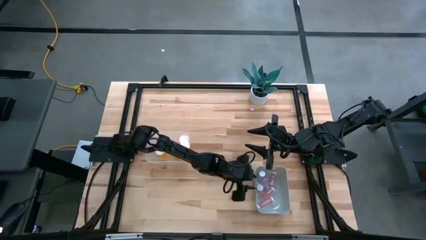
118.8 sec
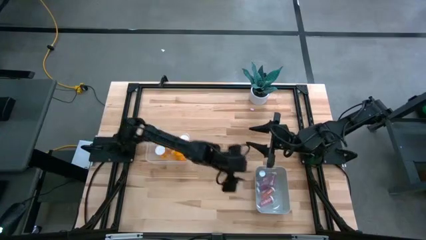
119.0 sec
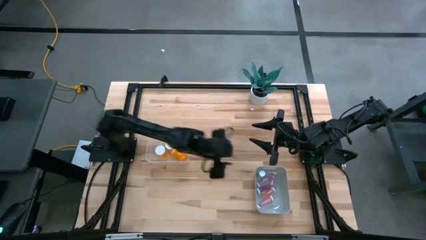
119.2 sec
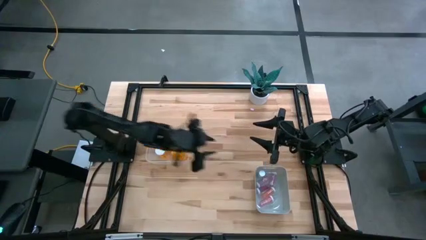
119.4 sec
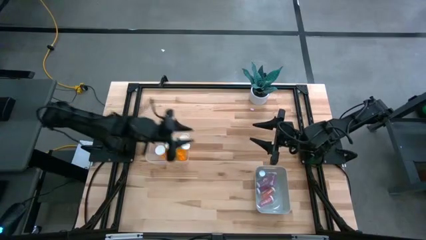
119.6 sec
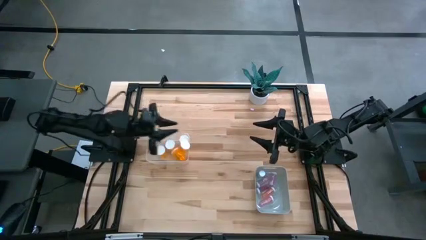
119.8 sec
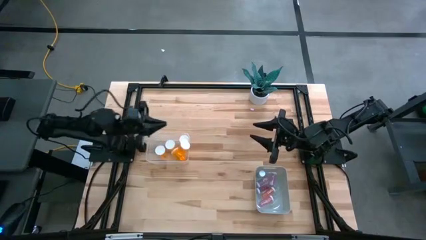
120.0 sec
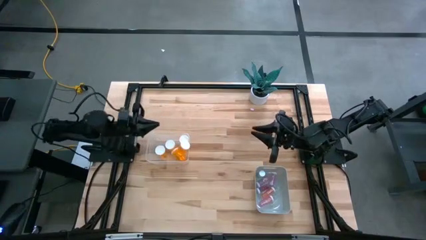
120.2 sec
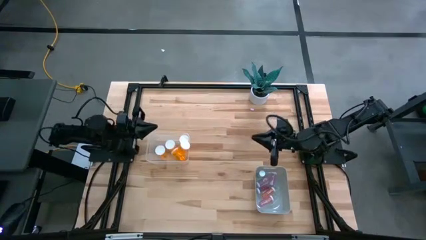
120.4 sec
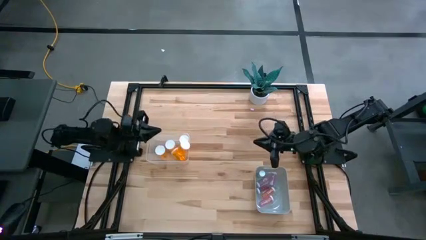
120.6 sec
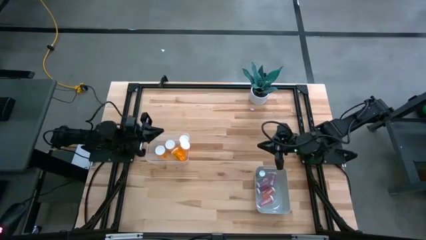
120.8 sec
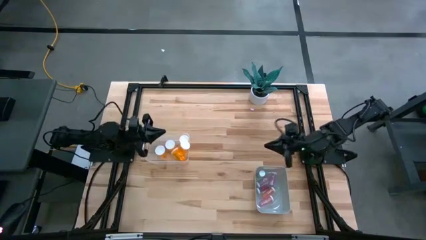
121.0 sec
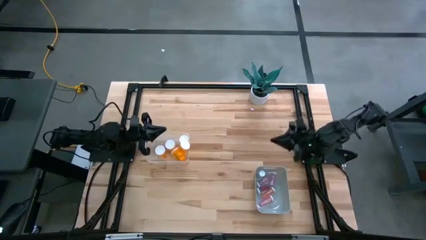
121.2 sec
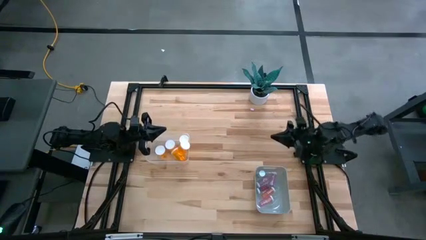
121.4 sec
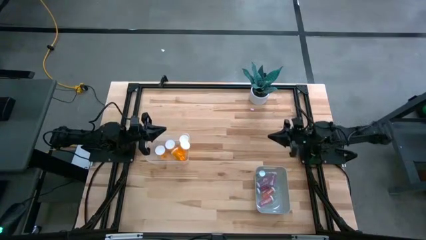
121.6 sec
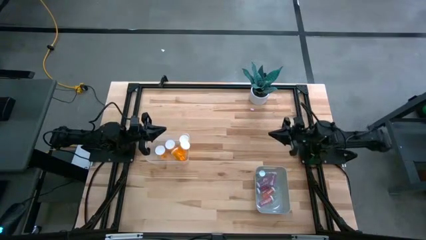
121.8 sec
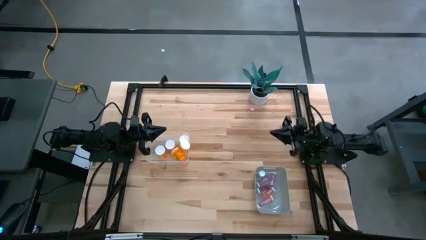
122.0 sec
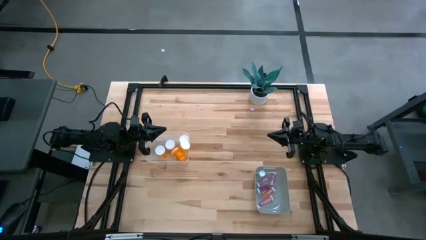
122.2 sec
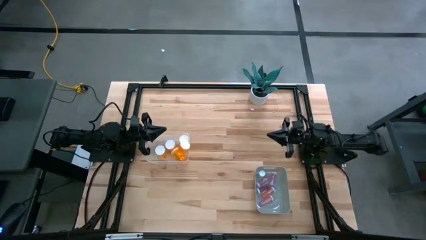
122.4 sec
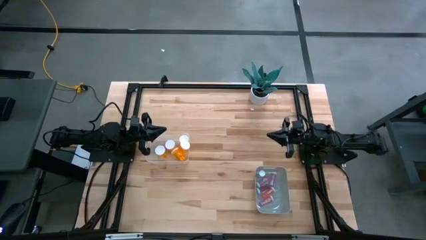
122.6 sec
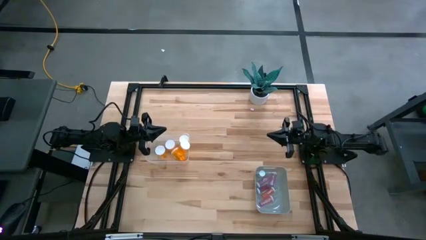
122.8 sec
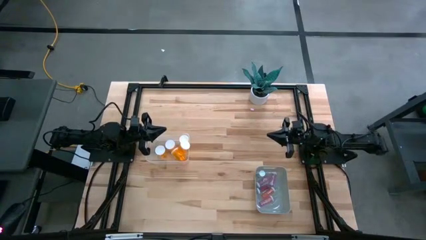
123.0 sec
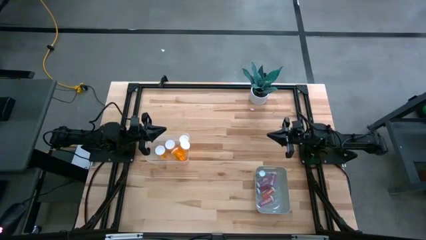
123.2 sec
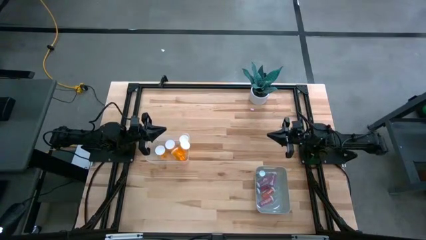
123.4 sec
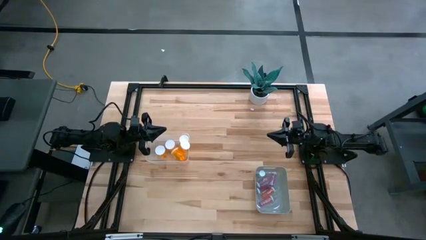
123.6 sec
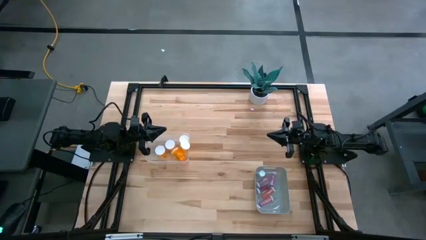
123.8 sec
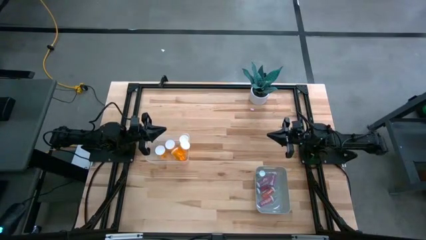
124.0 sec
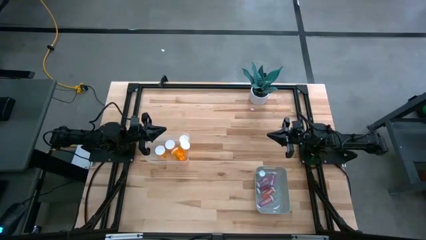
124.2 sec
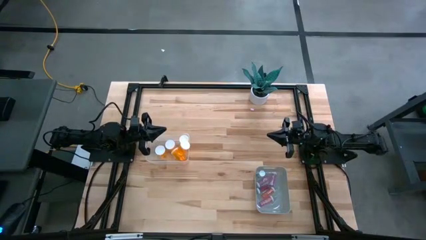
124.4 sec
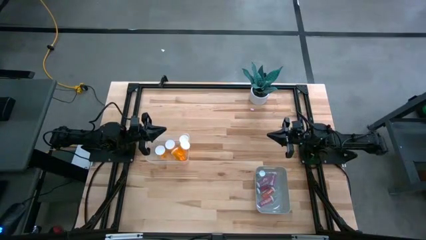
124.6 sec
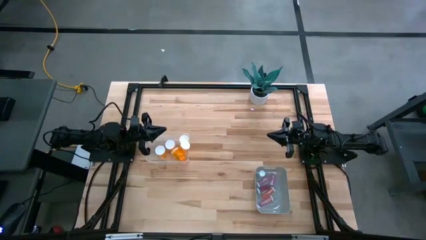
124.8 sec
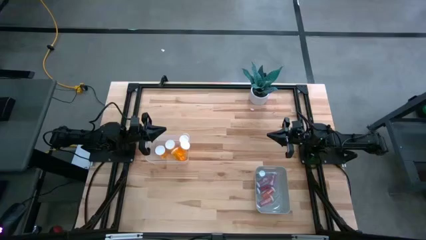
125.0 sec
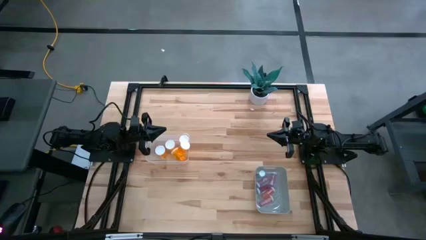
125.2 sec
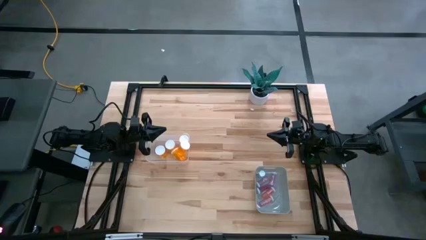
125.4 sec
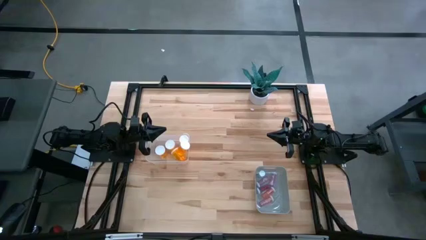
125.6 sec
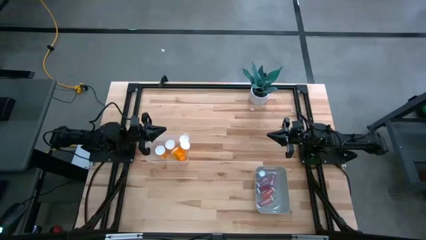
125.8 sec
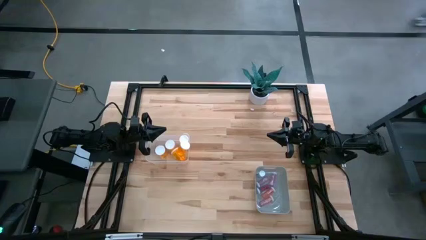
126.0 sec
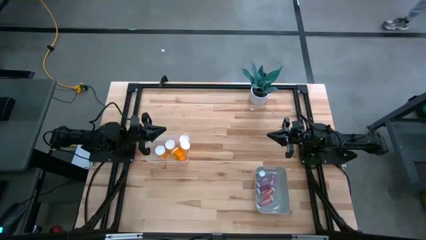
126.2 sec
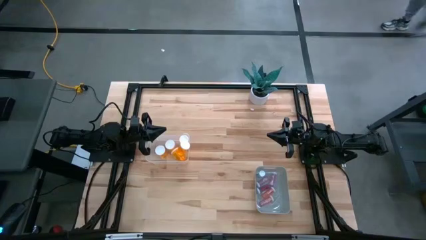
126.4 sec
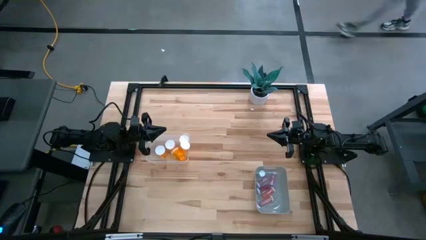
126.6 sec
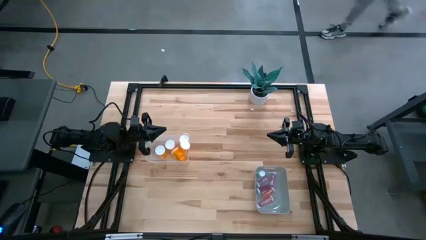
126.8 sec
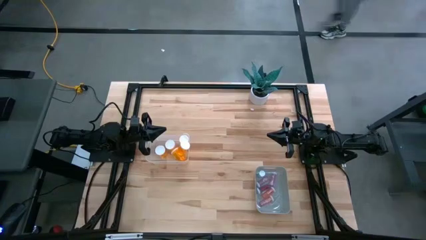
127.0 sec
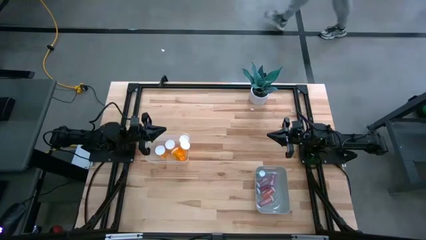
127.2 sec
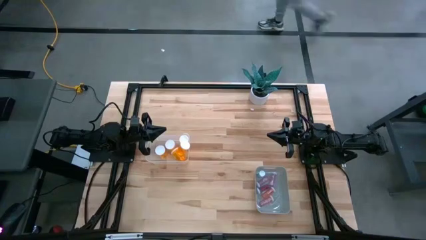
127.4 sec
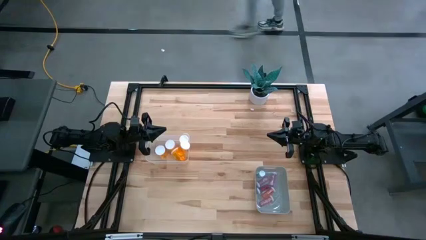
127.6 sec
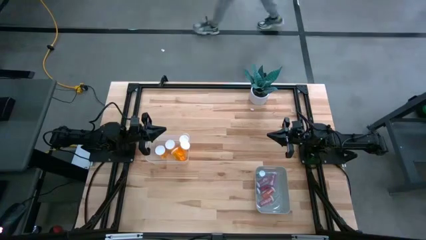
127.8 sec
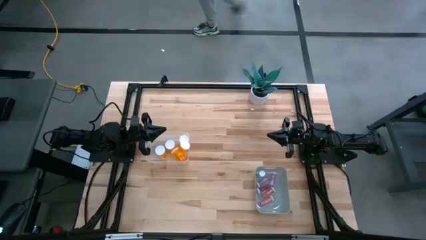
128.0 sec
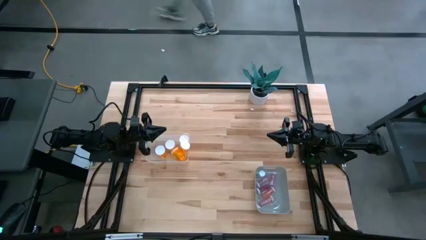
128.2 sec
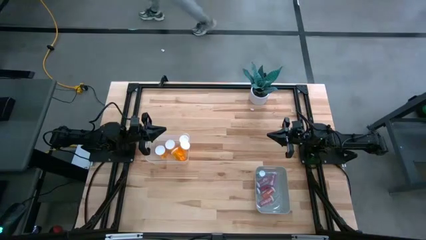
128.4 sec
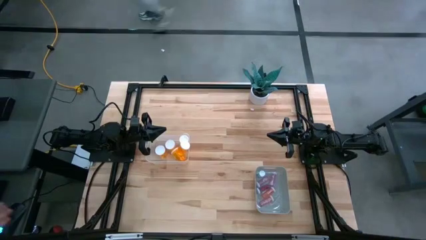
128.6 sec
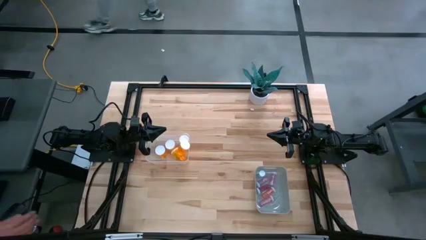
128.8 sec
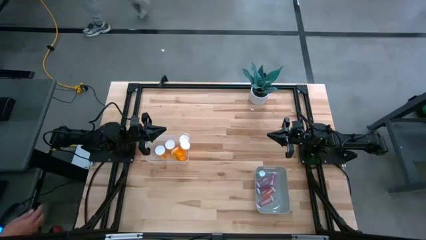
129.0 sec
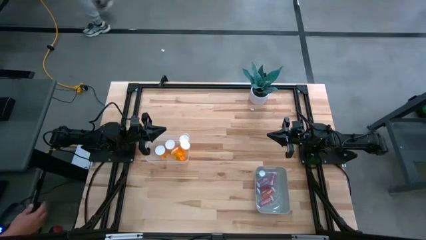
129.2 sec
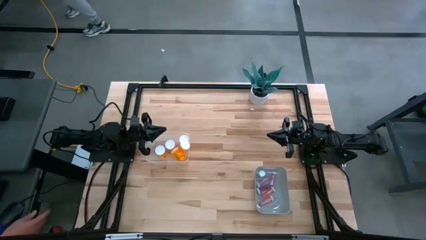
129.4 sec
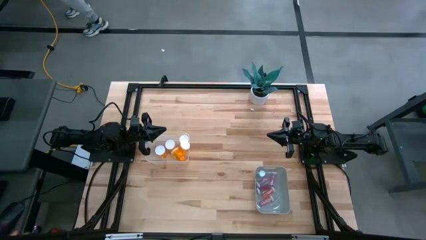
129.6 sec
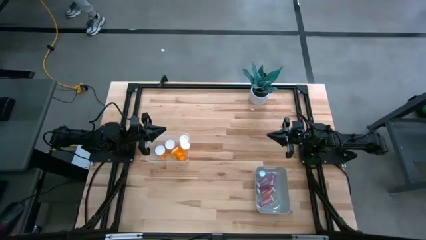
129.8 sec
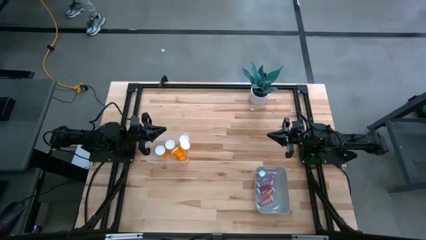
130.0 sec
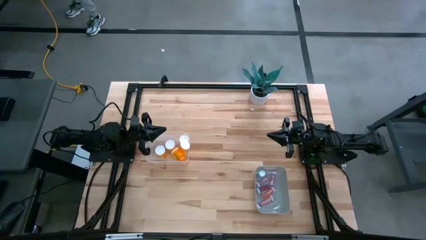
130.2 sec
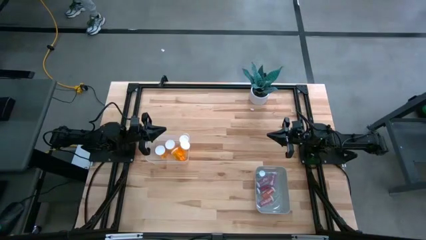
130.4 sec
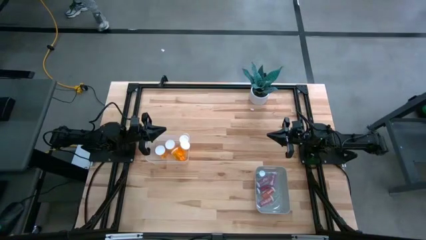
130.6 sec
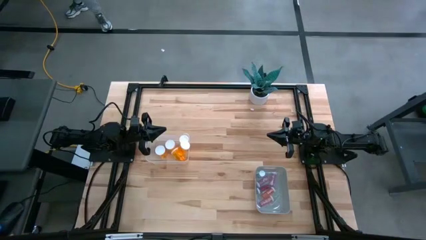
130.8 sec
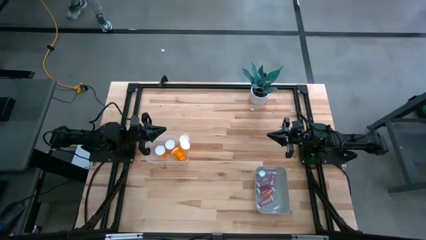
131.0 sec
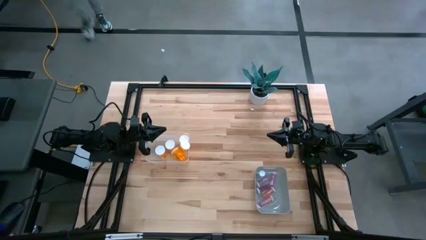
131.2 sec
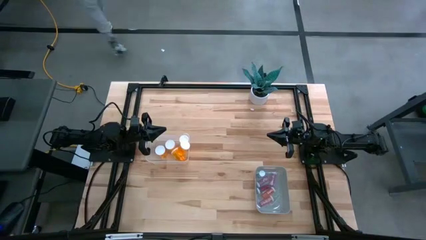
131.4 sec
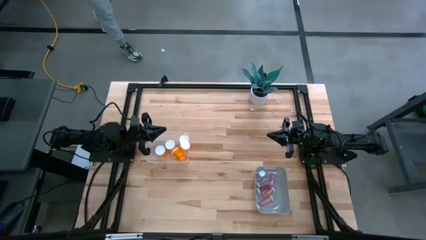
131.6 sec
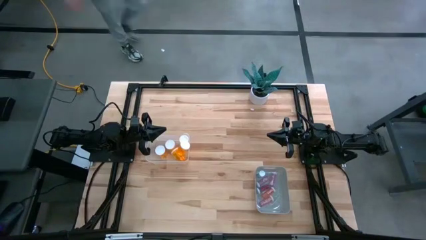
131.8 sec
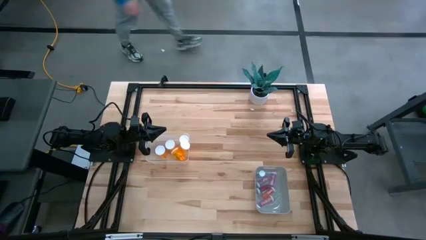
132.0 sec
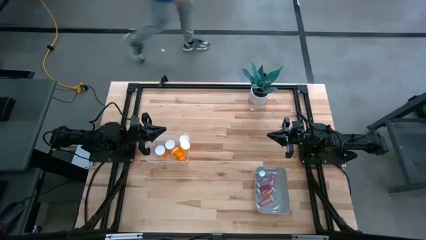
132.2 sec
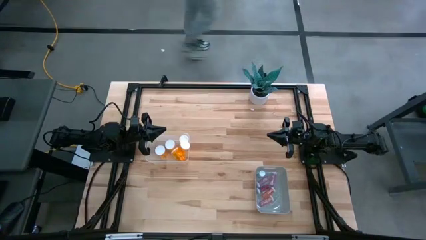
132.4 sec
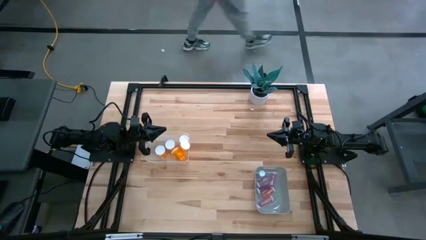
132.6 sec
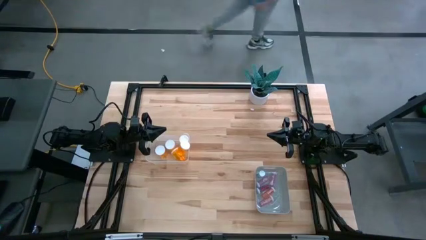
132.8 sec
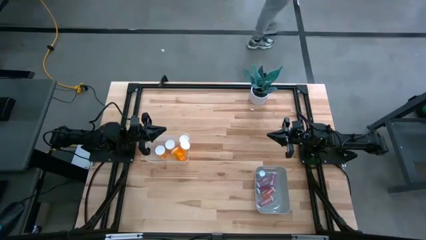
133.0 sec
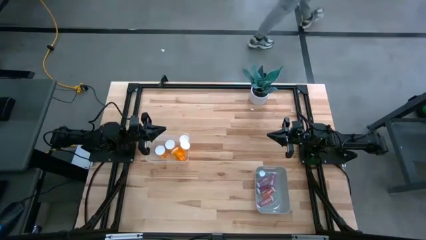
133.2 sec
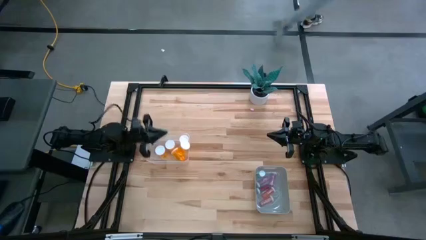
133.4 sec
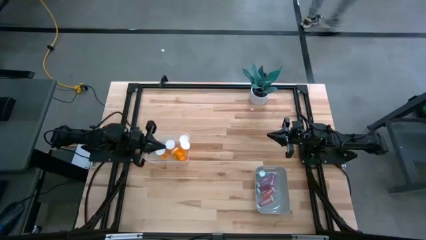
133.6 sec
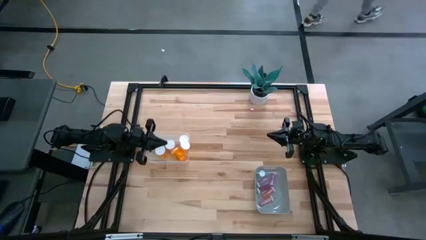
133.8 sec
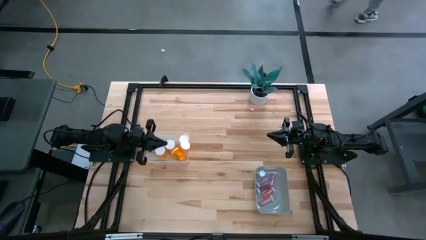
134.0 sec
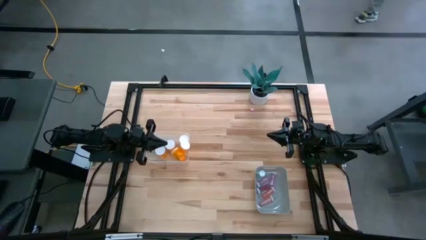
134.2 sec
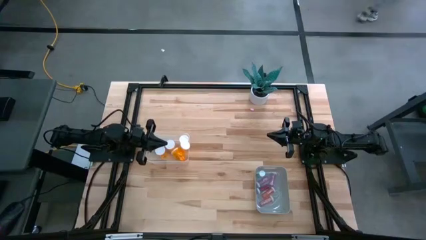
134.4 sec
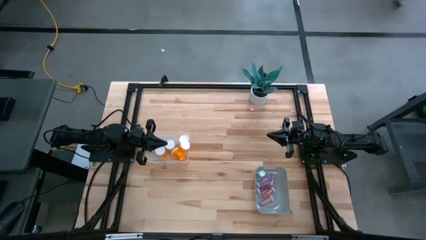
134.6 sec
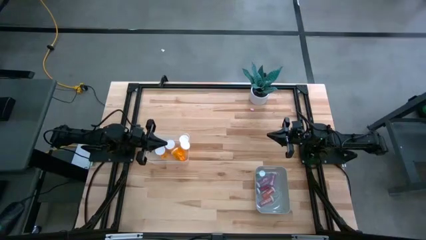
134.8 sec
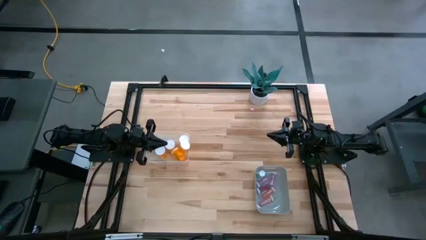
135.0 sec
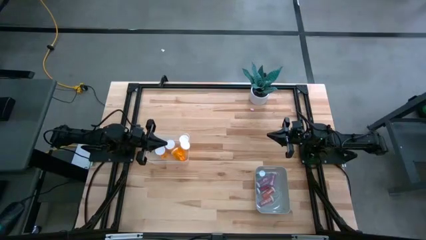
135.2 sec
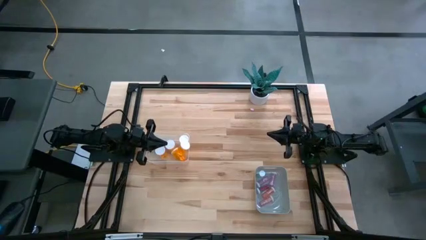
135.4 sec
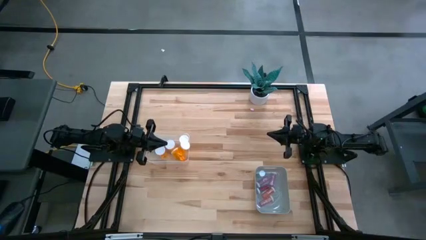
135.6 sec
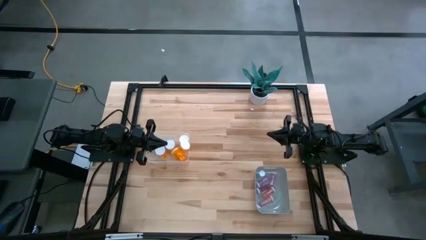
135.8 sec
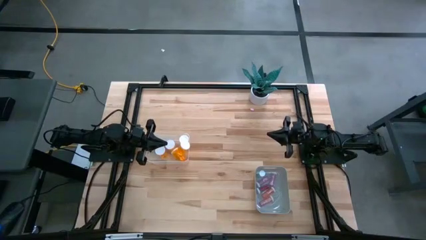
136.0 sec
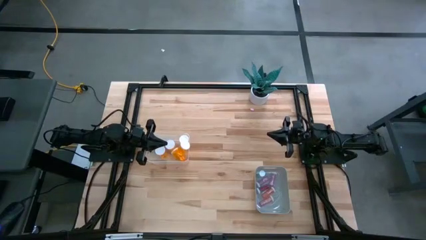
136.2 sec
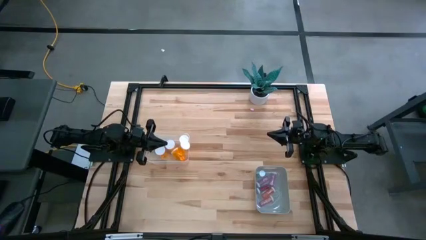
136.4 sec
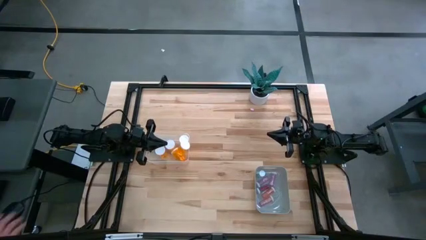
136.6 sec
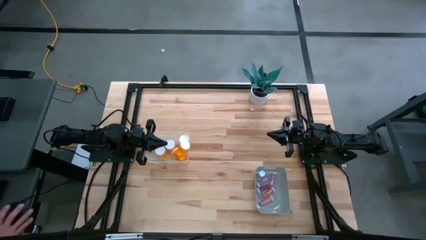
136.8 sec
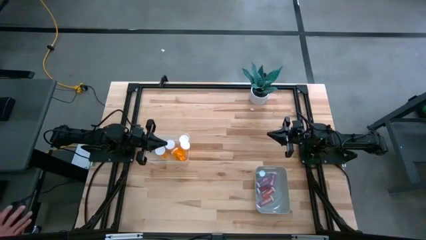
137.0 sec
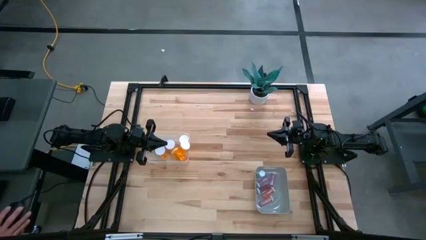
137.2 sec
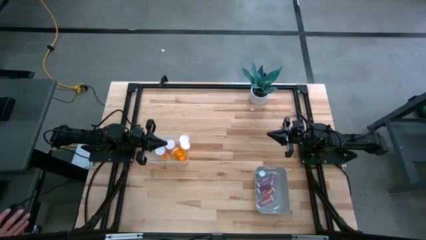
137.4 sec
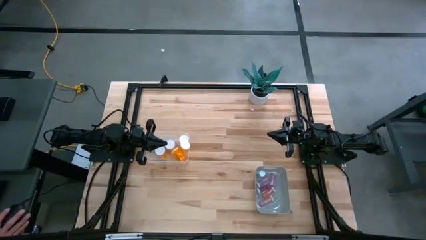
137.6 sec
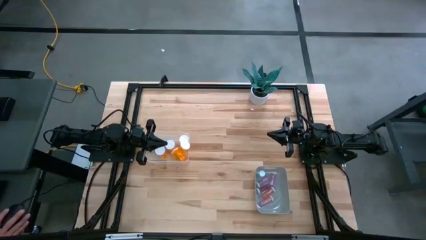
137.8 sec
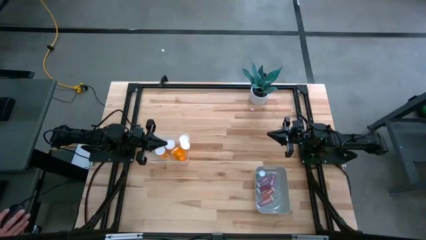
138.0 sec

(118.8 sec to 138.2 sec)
Task: Pick and place medicine bottles into bin by pill shape (circle, oval)
Return to Home Position
